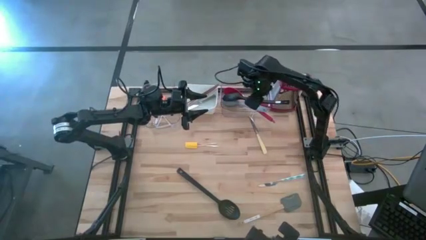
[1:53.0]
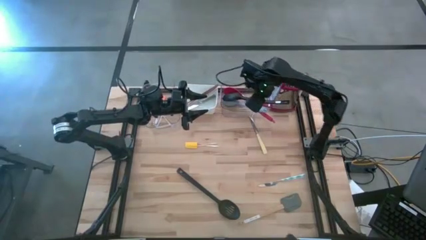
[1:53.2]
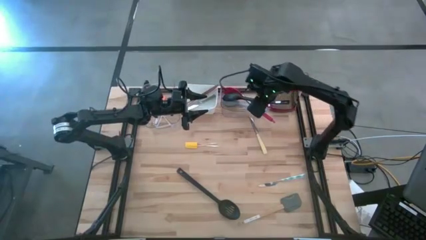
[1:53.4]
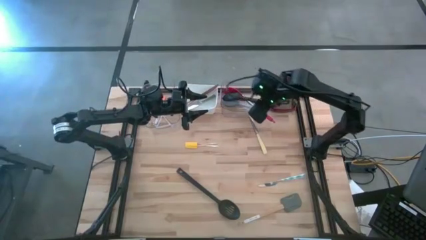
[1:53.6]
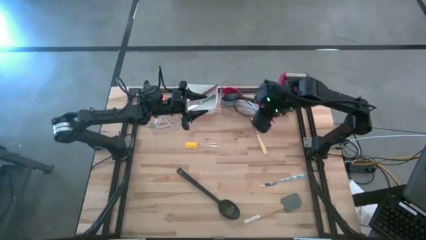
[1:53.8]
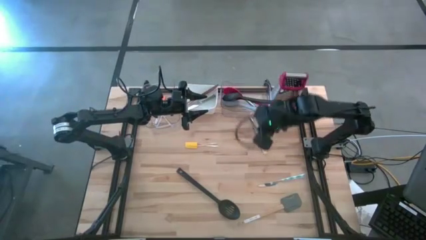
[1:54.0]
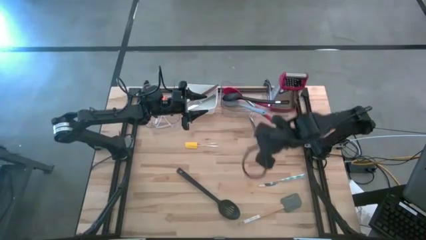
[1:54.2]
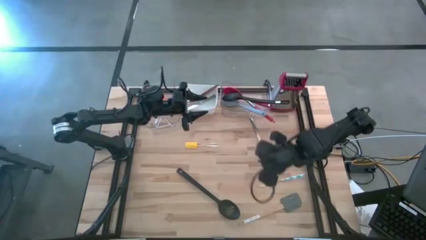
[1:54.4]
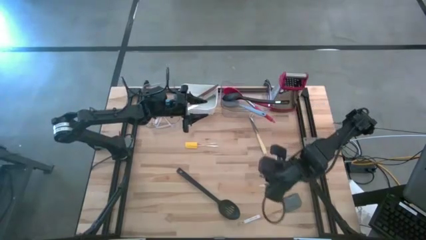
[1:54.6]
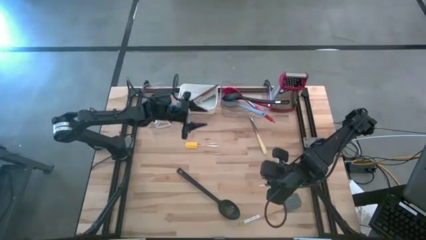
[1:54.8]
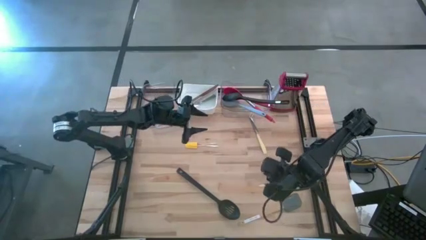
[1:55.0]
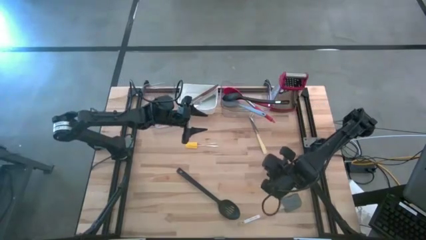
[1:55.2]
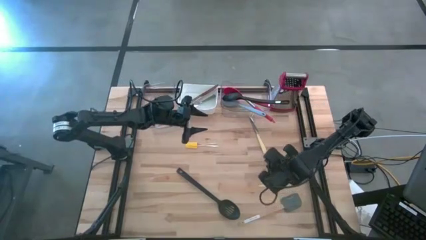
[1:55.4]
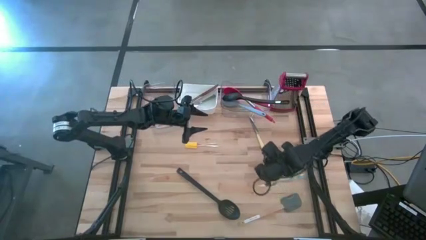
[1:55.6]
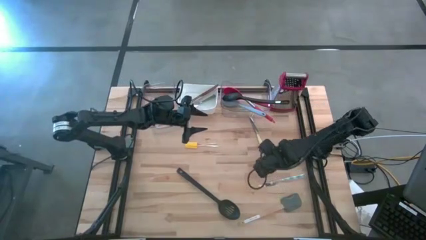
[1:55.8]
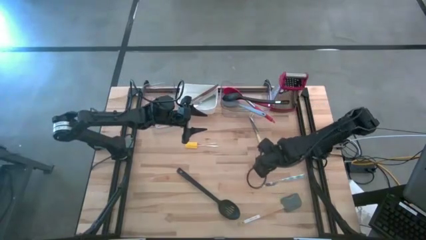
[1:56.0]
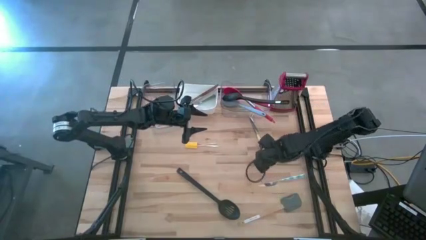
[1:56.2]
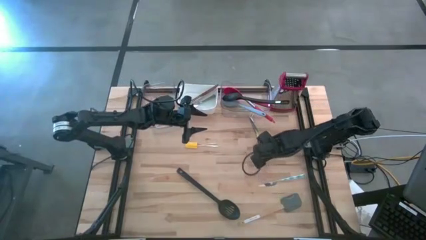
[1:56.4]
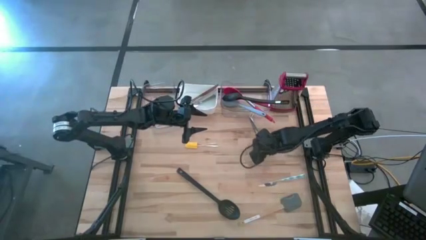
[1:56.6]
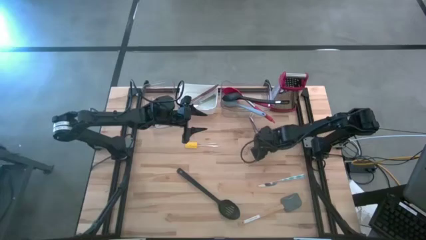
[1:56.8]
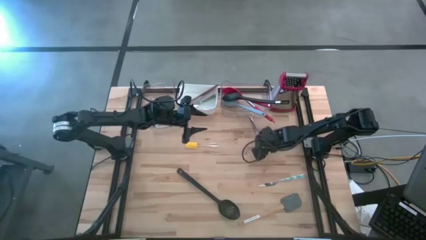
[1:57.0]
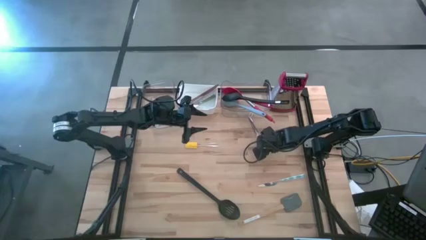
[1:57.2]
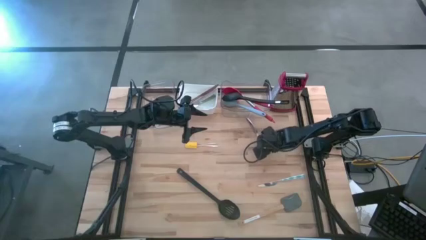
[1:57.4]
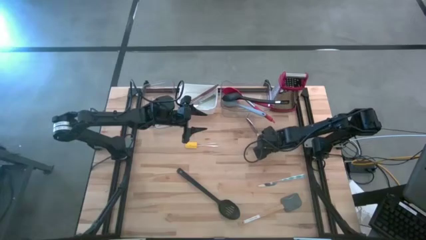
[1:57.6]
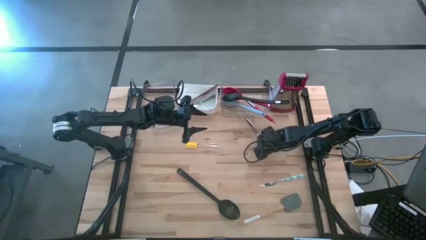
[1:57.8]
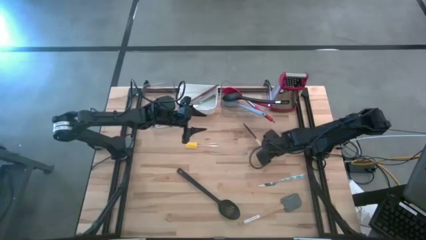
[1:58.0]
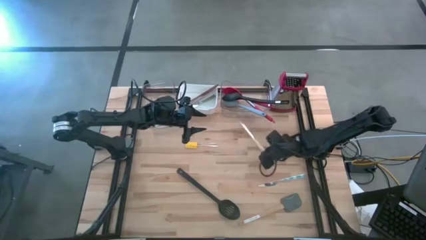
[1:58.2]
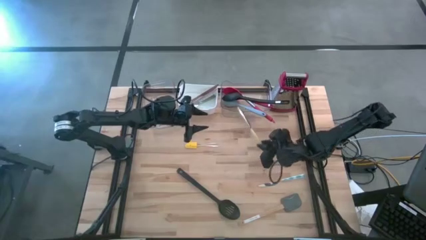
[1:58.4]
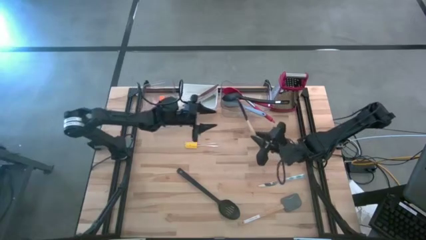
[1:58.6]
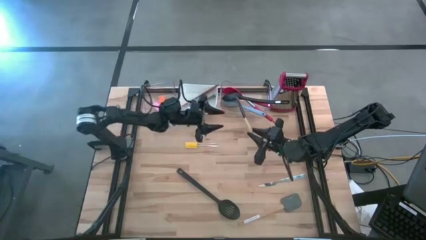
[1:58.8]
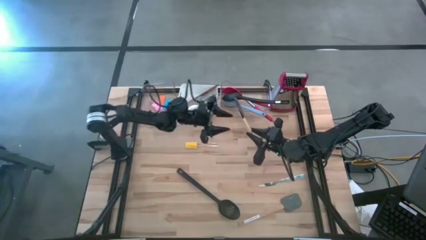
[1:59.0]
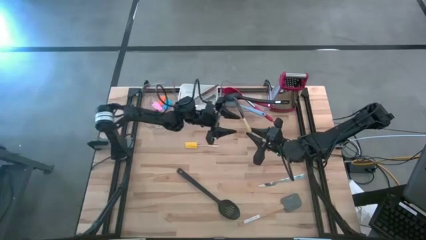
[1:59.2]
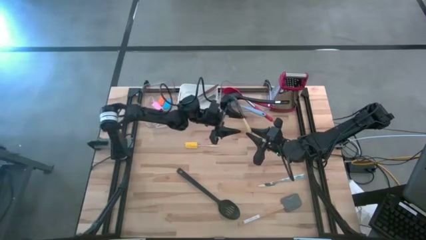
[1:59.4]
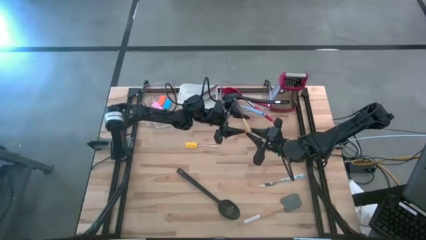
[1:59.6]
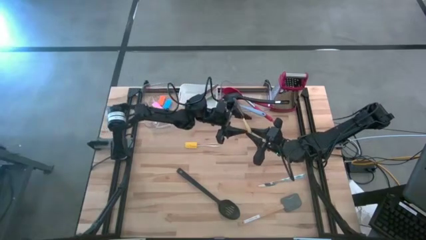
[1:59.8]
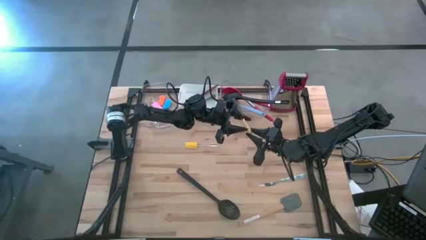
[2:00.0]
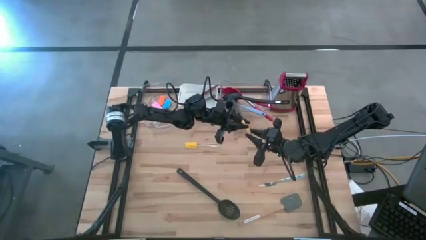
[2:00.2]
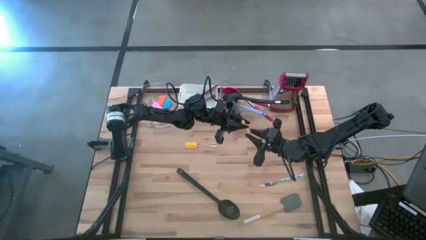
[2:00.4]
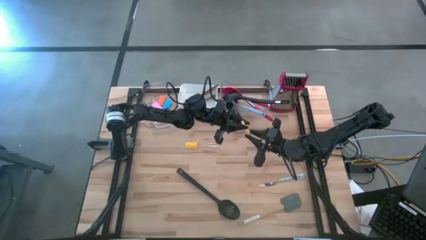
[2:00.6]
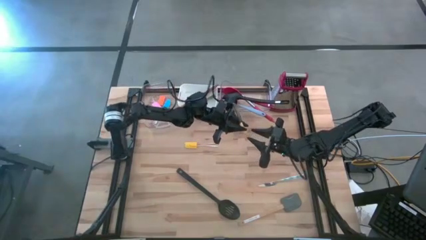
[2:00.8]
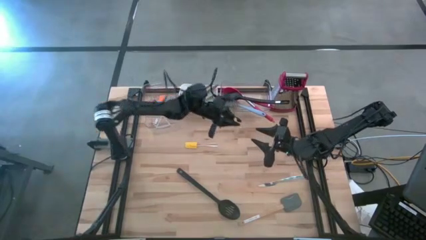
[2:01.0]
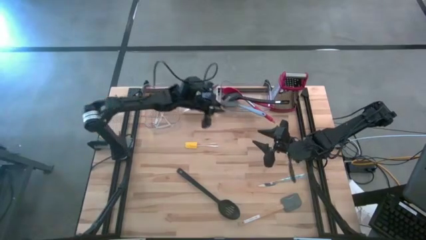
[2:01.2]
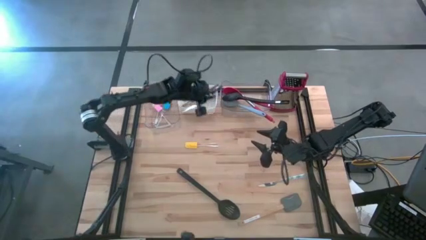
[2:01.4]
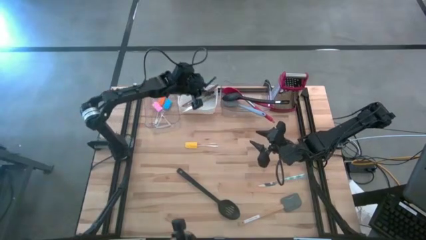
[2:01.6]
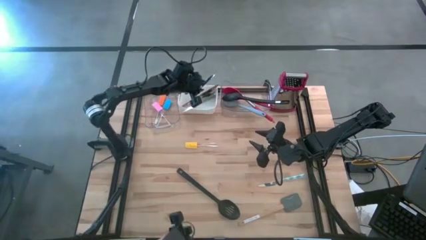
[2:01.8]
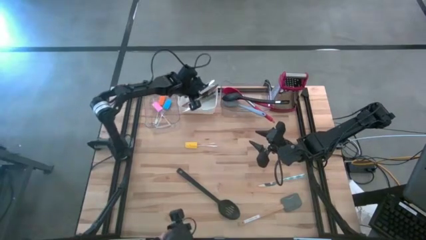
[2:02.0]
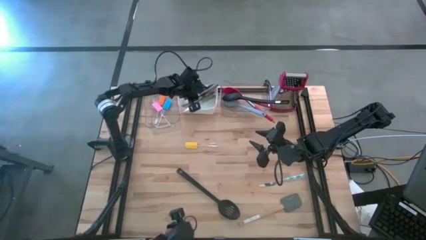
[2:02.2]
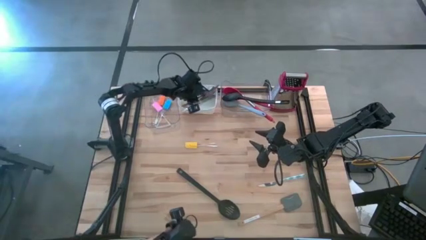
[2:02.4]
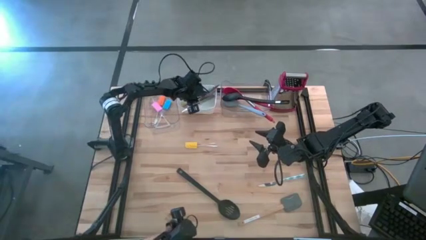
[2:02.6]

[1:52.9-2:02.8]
Task: Pick & Place Kitchen Items
Put the light yellow knife into the white bin

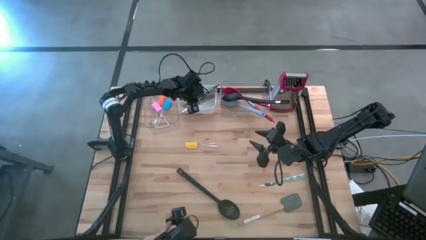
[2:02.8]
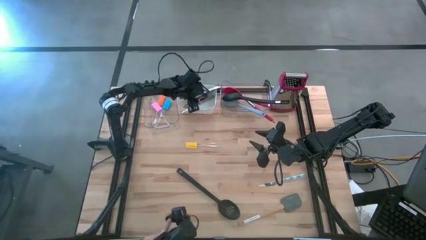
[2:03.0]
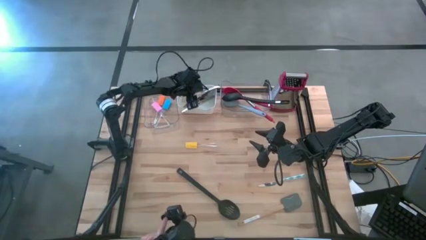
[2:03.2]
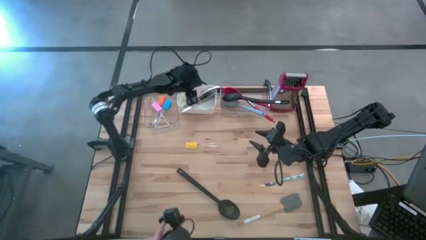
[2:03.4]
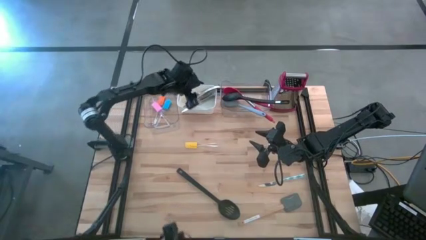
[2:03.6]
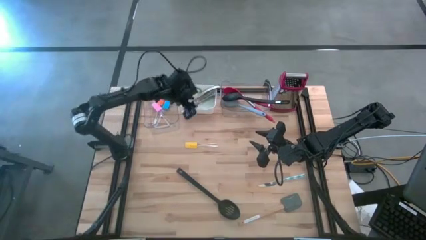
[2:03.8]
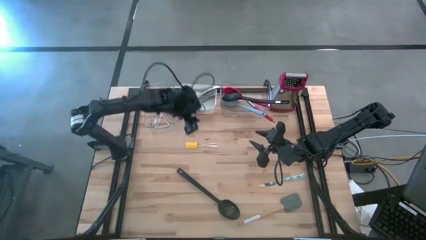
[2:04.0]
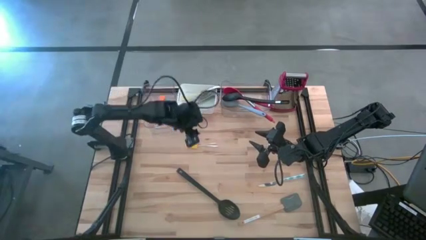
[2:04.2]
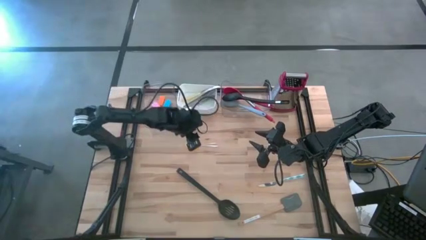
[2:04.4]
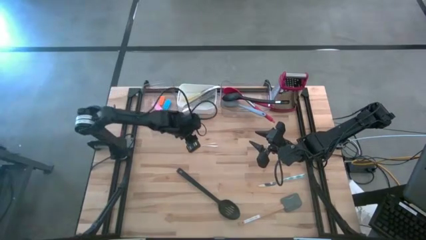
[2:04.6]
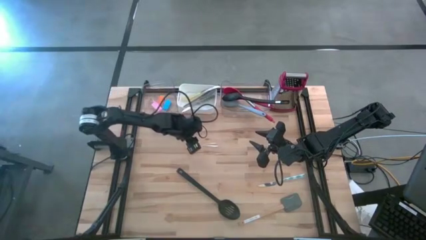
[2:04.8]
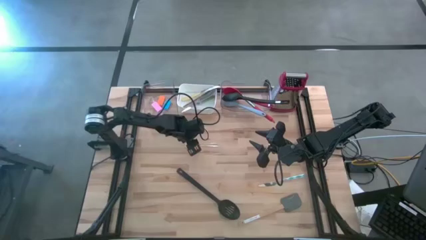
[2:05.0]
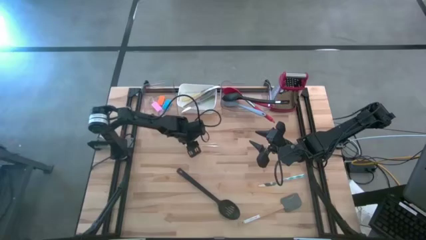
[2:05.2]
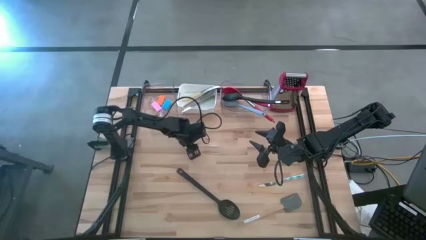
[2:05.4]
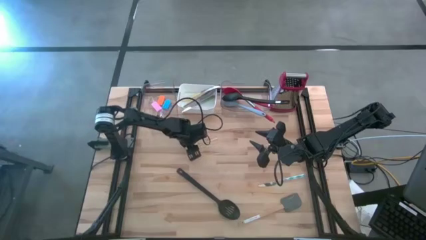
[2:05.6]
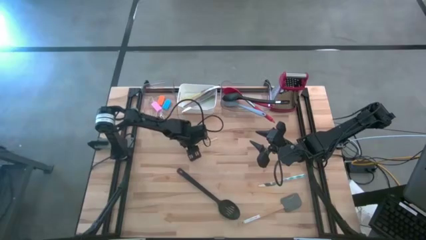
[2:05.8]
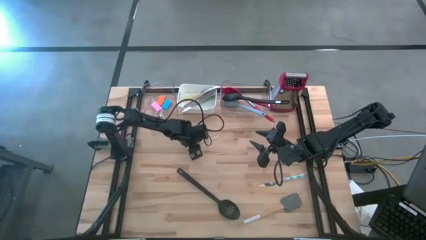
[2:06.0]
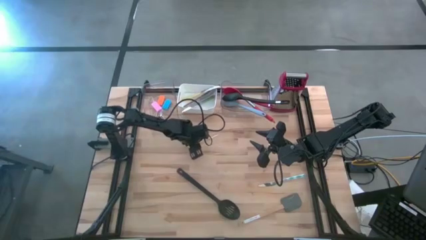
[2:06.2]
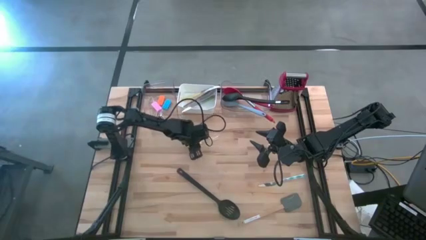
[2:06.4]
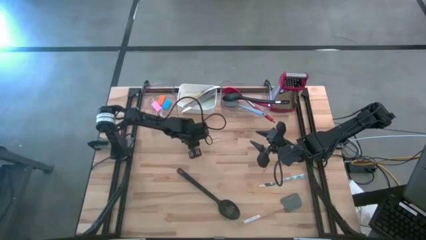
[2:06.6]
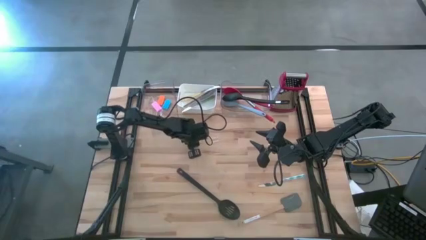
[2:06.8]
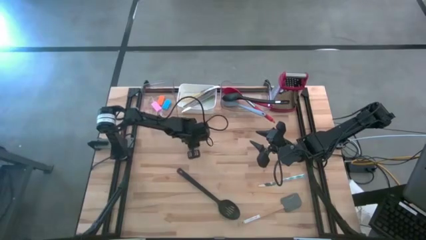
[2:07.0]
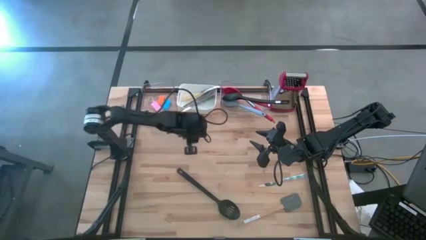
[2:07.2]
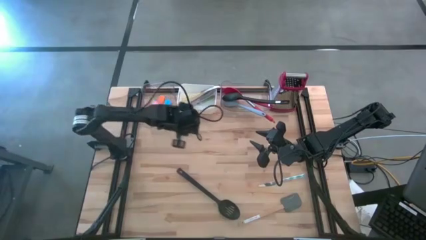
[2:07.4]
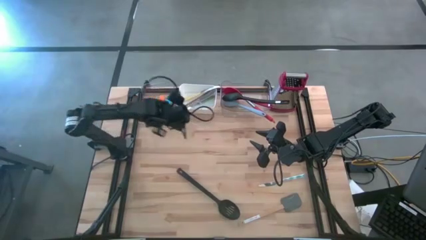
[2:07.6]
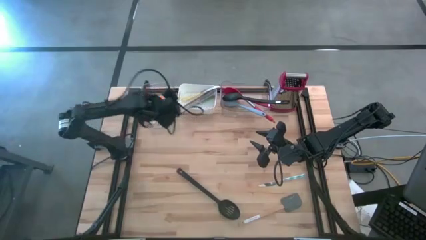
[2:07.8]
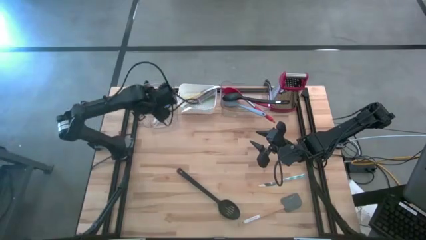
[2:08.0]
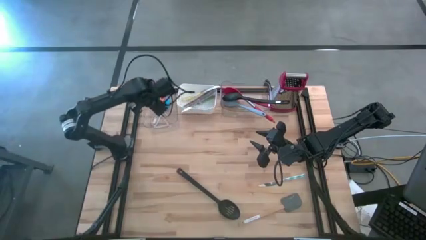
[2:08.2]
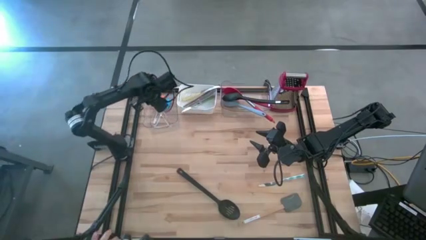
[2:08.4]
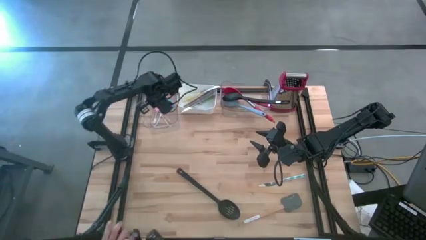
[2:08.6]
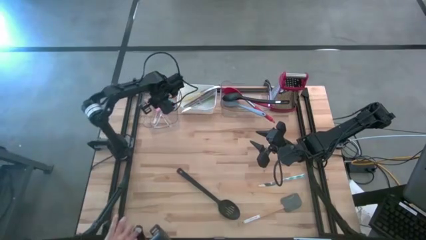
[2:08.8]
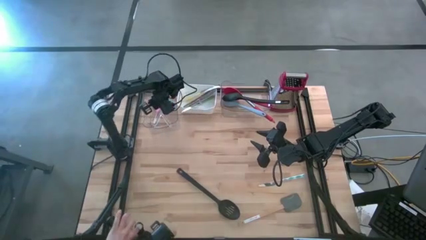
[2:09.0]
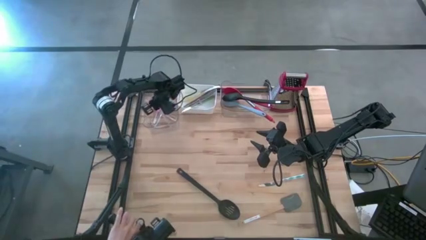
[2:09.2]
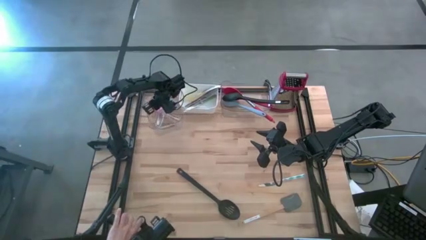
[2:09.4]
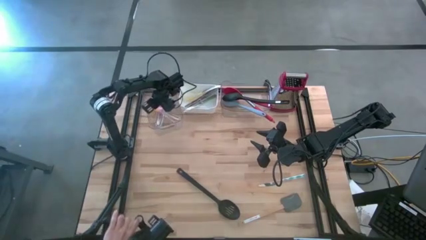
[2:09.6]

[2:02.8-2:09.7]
Put the yellow spatula into the left transparent bin

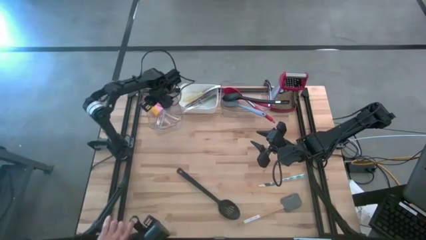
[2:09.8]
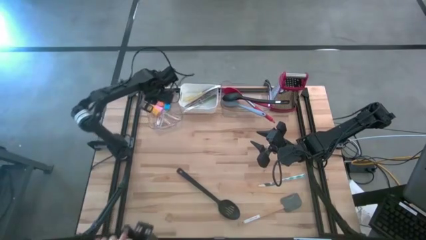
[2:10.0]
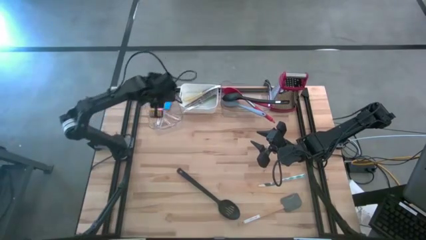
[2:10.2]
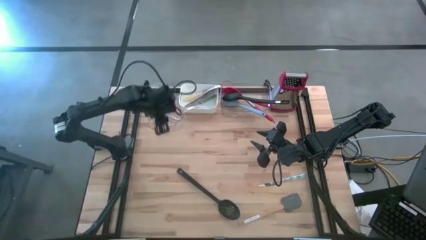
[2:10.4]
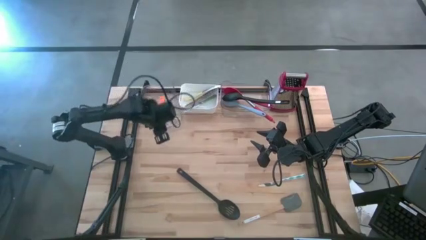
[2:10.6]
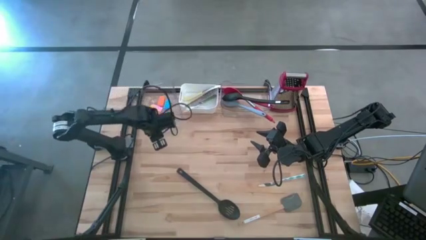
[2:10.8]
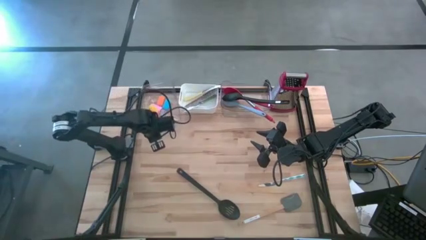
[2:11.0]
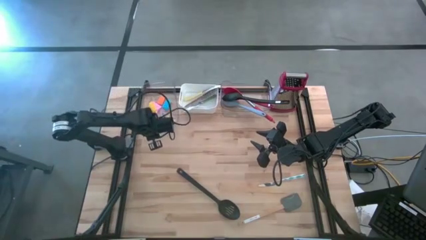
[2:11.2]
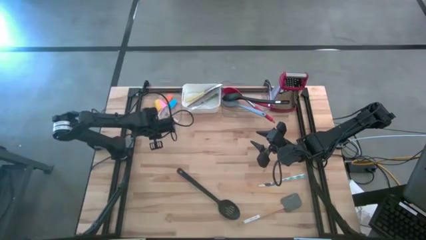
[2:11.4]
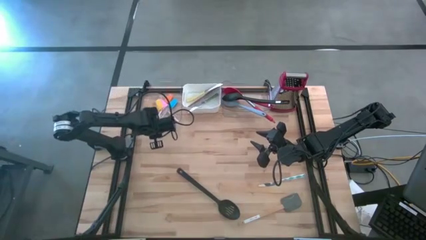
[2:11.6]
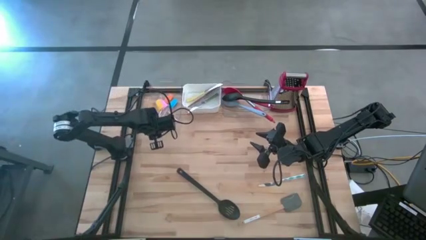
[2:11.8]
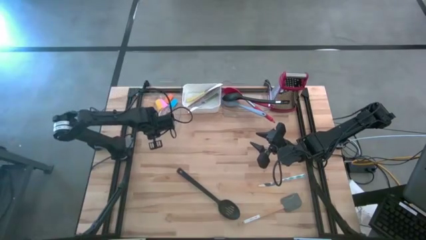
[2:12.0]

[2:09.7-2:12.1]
Adjust the left transparent bin
